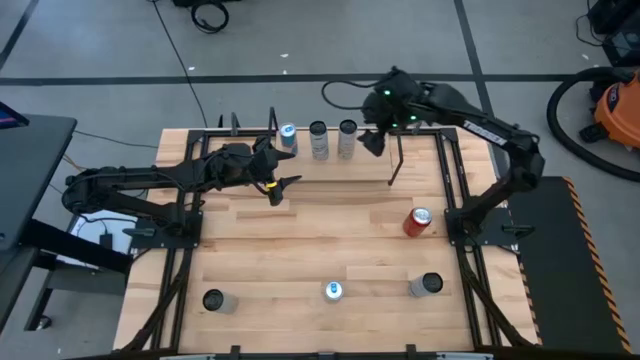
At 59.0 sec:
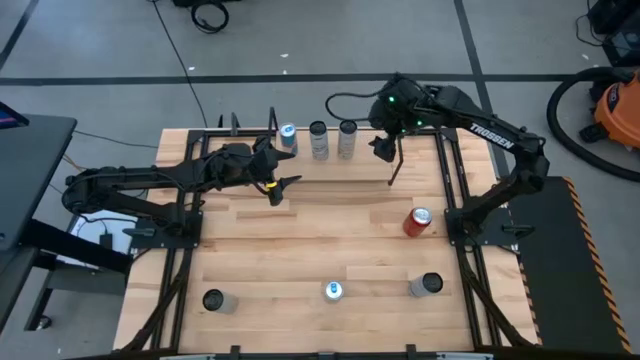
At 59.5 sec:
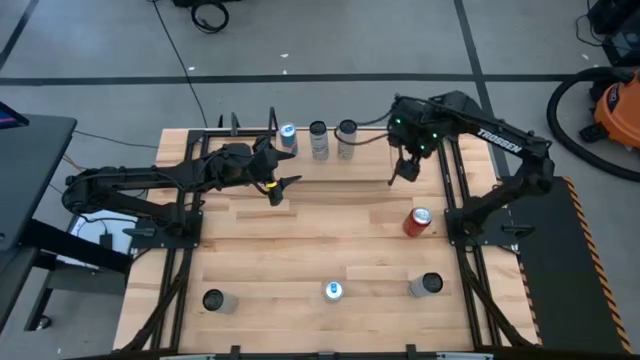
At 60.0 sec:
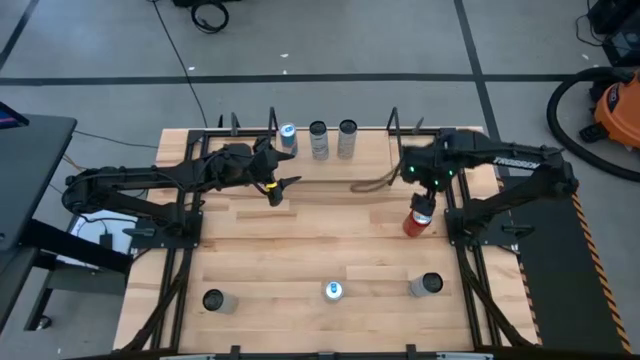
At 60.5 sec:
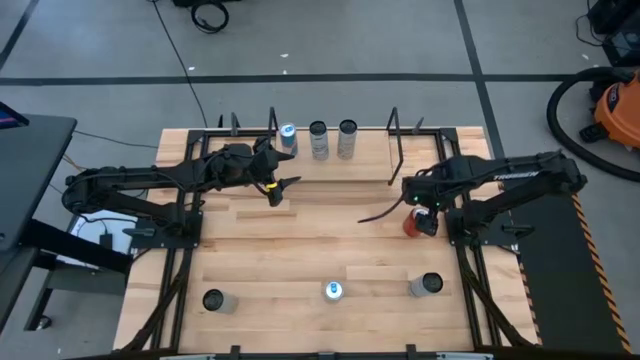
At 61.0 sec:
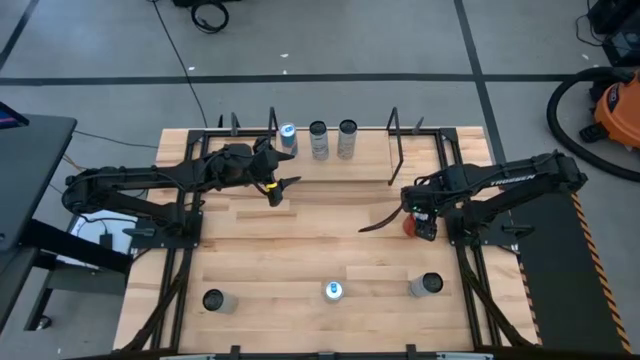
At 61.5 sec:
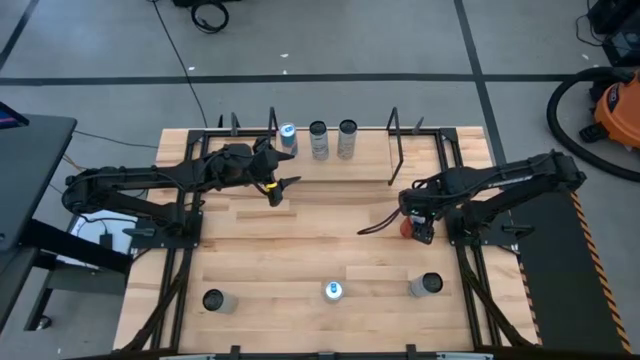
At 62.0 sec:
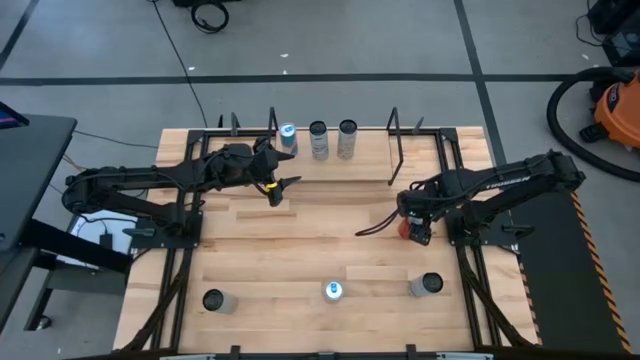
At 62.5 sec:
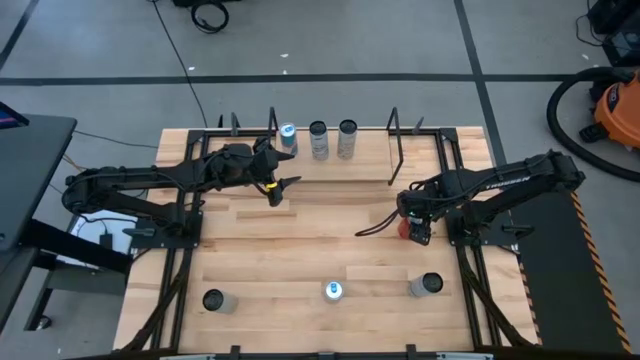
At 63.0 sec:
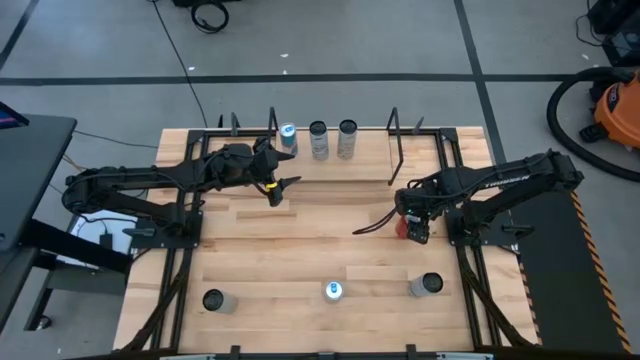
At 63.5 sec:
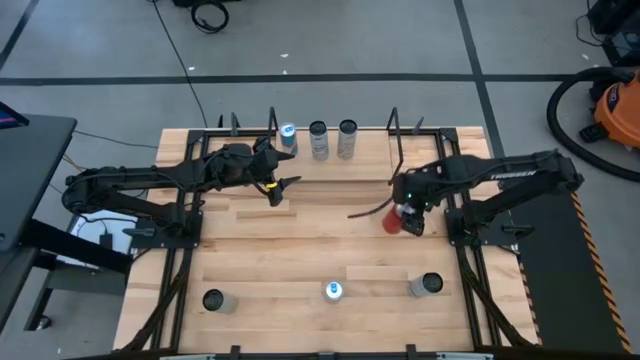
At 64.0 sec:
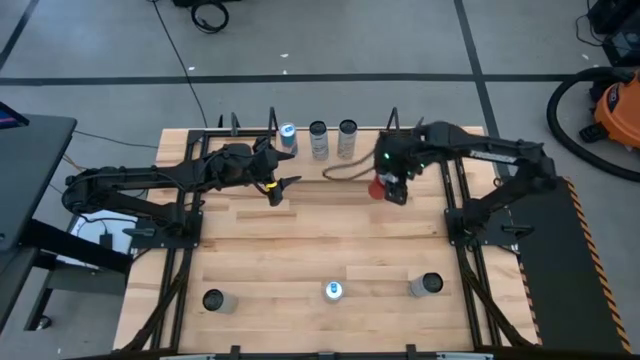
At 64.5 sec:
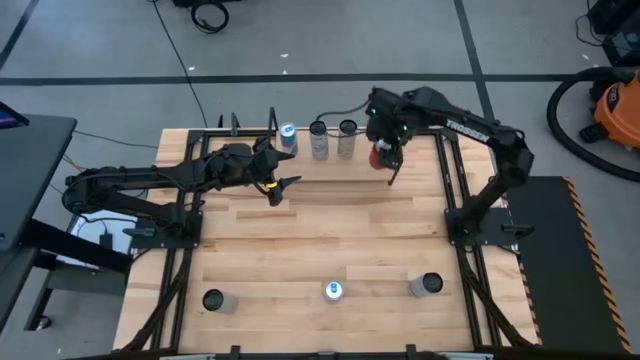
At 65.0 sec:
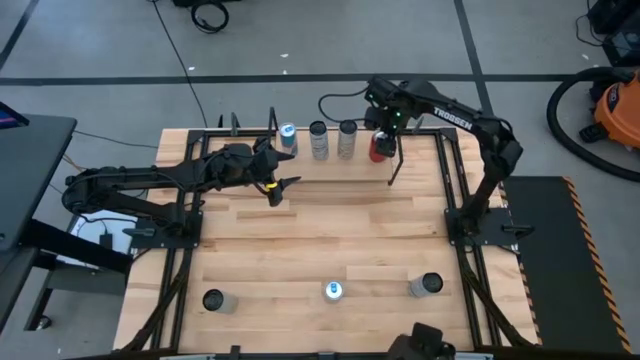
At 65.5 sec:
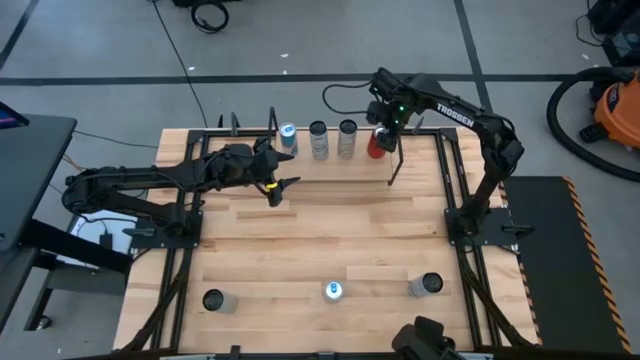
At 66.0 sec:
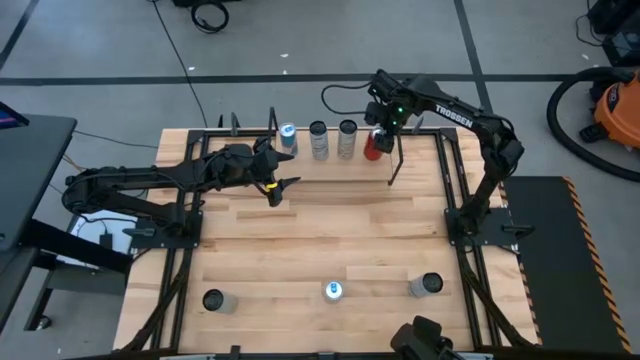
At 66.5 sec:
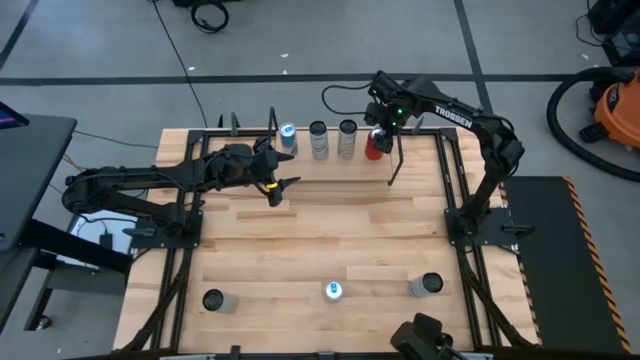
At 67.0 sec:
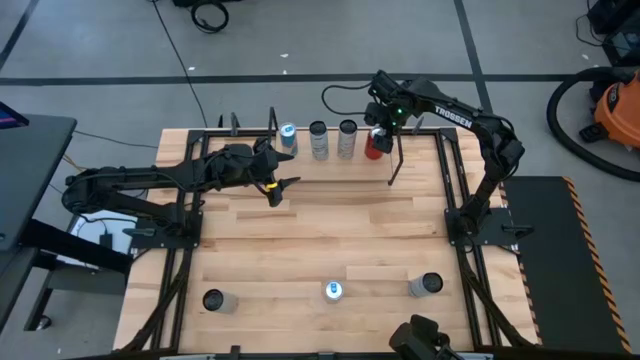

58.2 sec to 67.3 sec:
Task: Place canned beverage on shelf
Put the bottom red-black soda can on the shelf

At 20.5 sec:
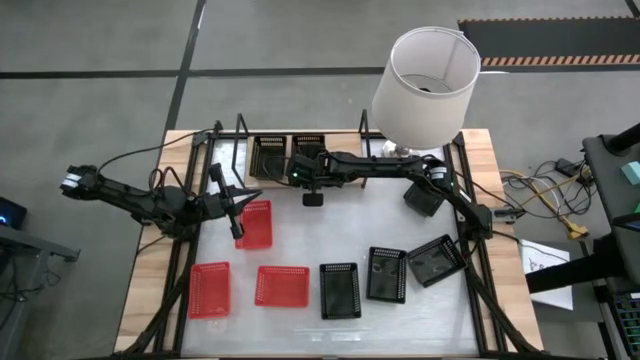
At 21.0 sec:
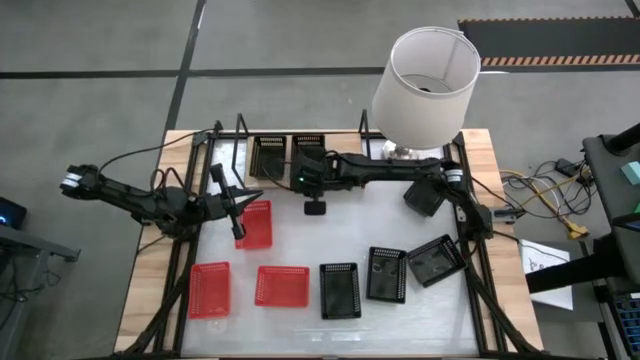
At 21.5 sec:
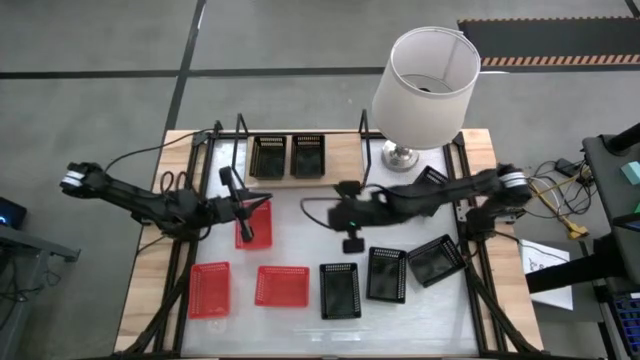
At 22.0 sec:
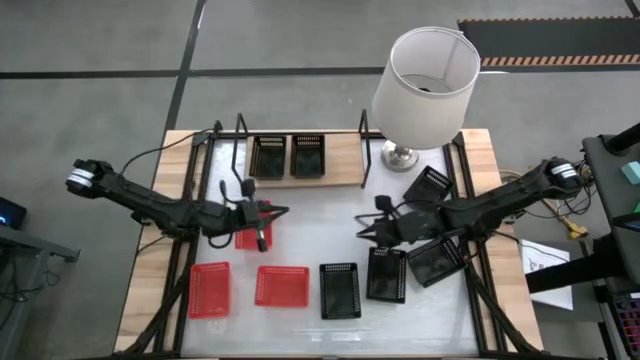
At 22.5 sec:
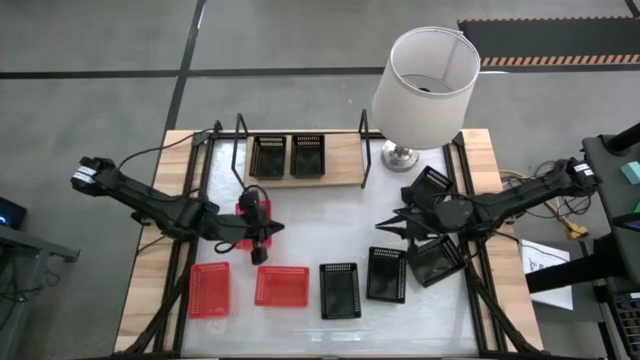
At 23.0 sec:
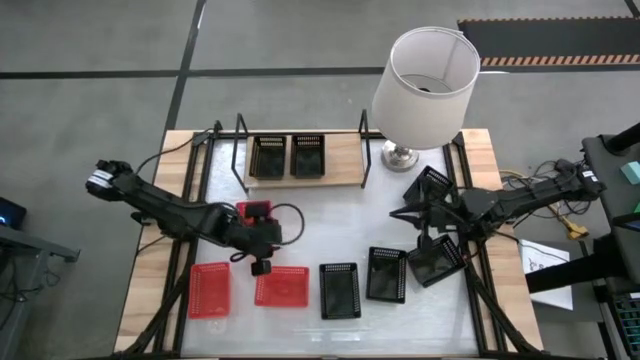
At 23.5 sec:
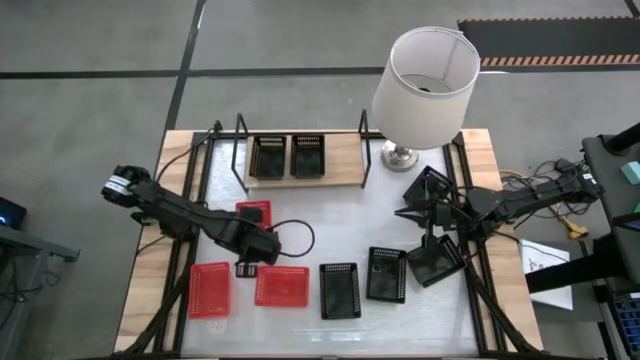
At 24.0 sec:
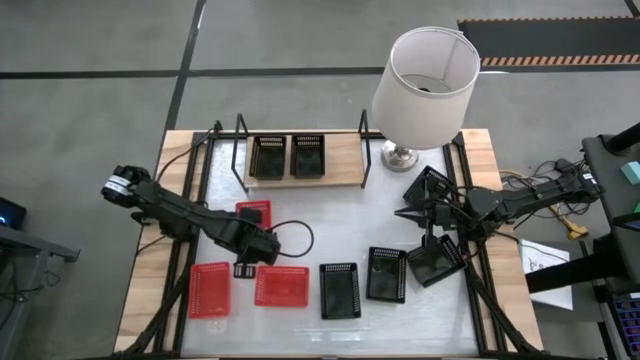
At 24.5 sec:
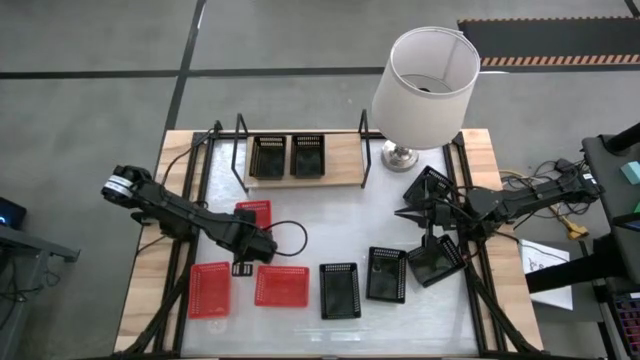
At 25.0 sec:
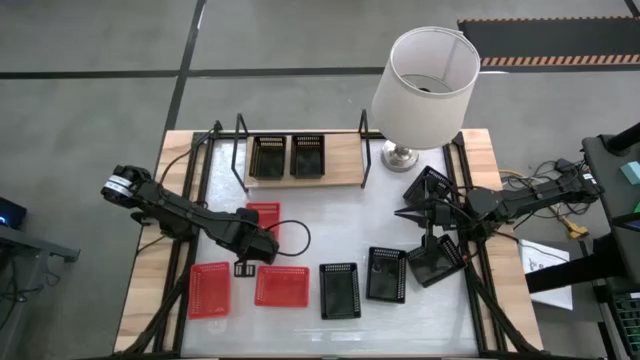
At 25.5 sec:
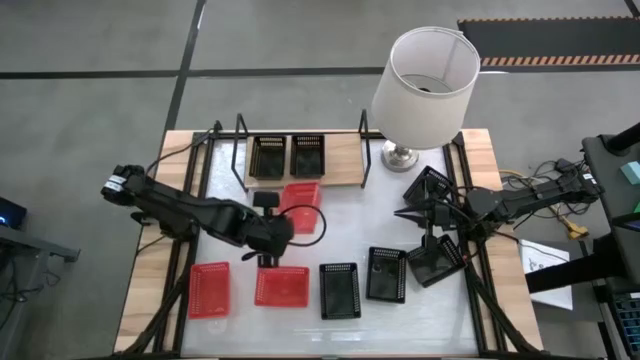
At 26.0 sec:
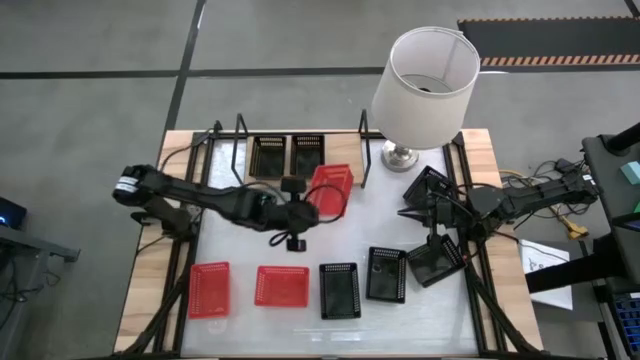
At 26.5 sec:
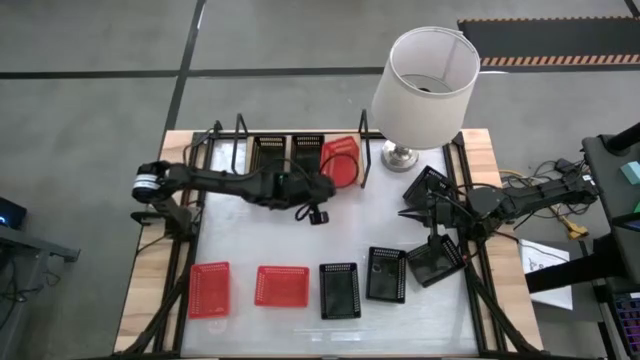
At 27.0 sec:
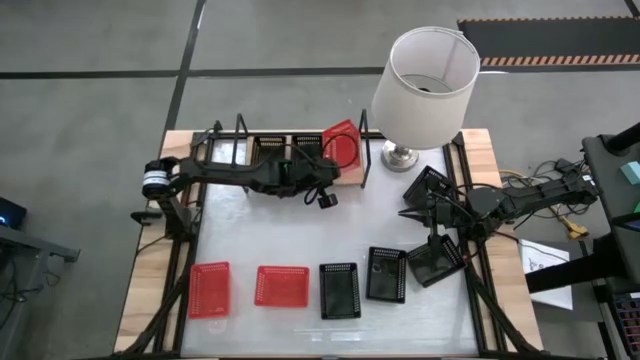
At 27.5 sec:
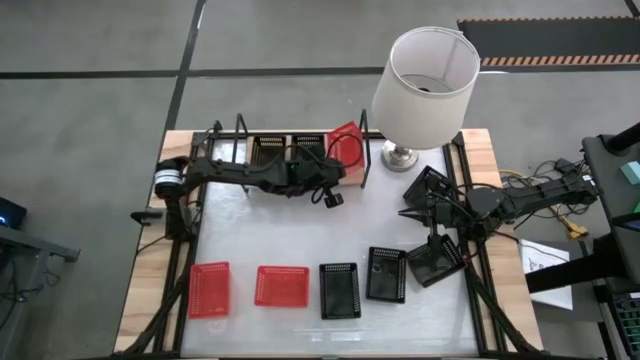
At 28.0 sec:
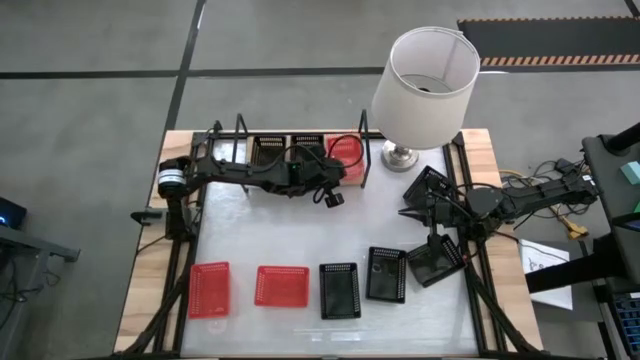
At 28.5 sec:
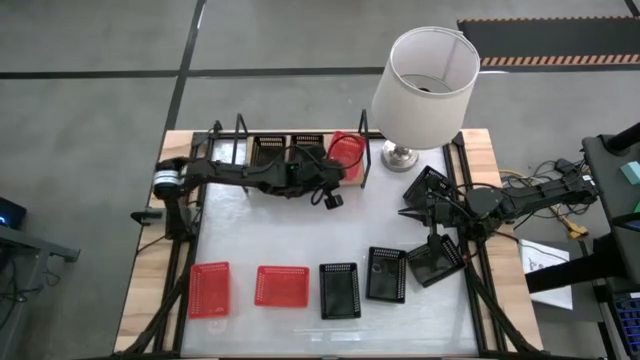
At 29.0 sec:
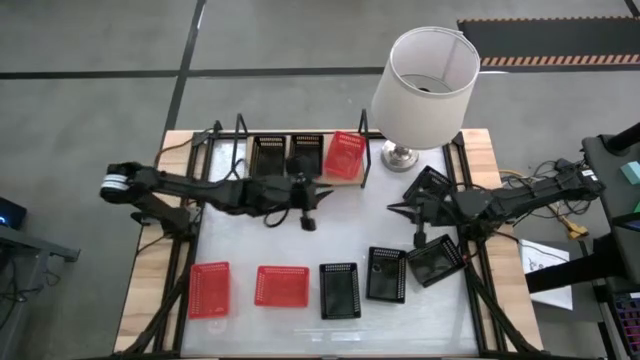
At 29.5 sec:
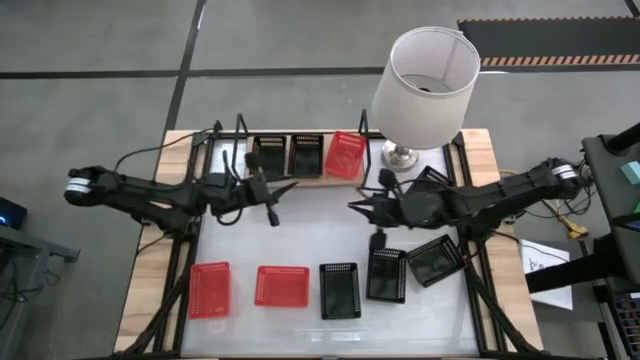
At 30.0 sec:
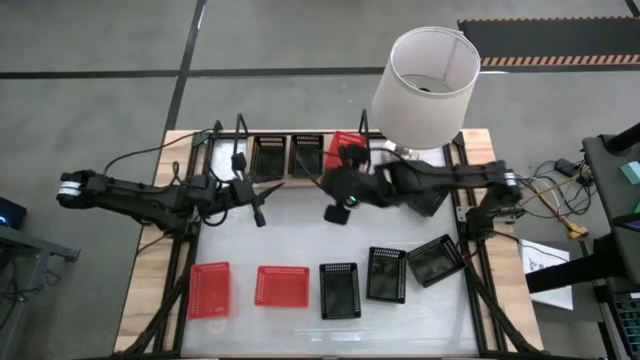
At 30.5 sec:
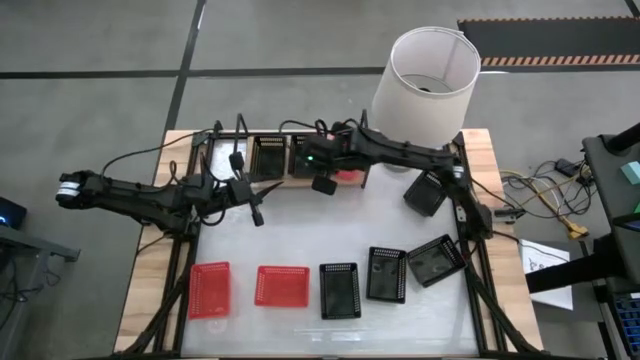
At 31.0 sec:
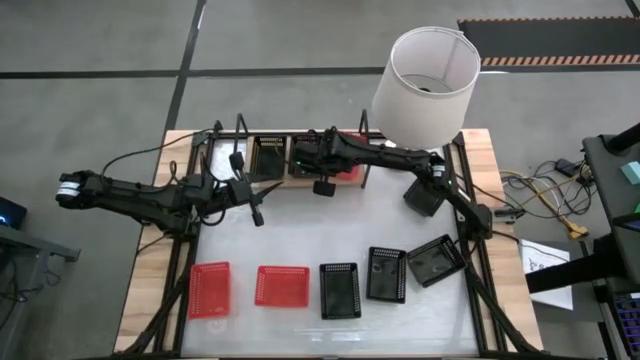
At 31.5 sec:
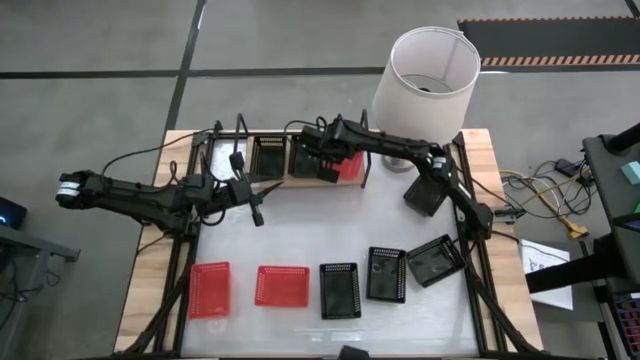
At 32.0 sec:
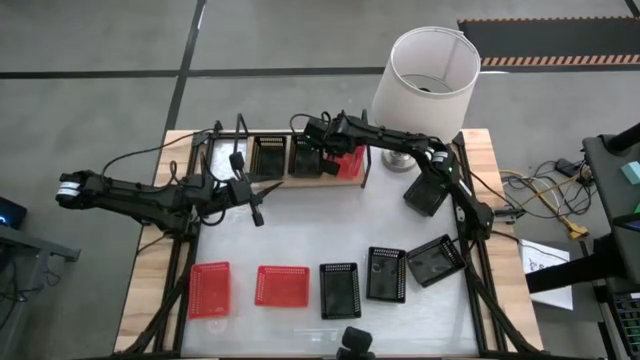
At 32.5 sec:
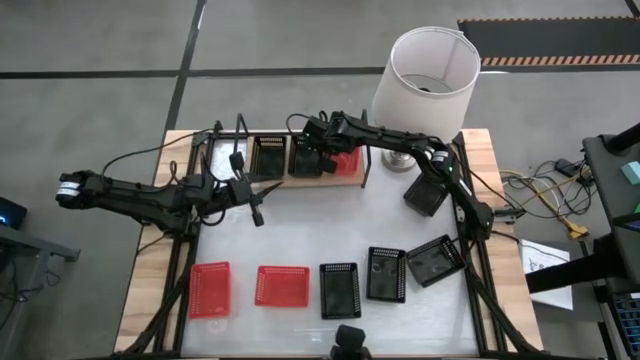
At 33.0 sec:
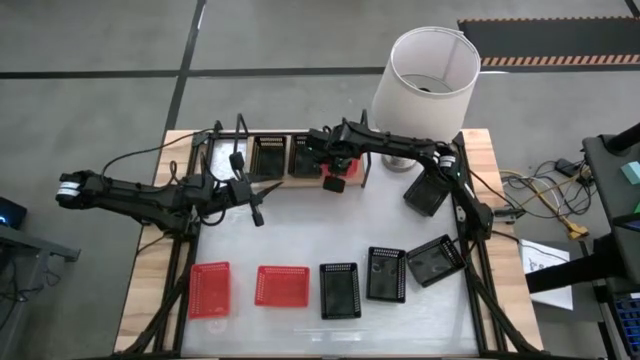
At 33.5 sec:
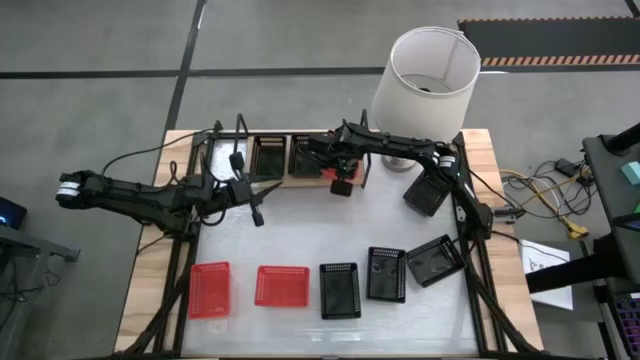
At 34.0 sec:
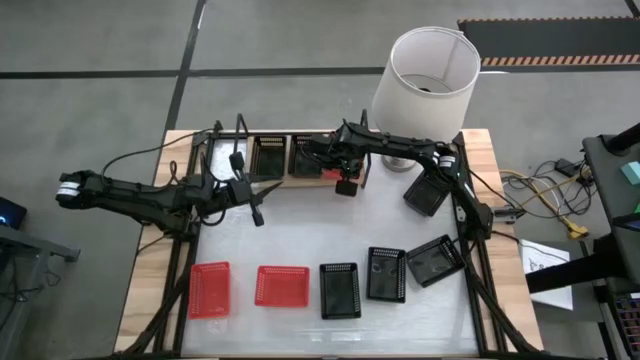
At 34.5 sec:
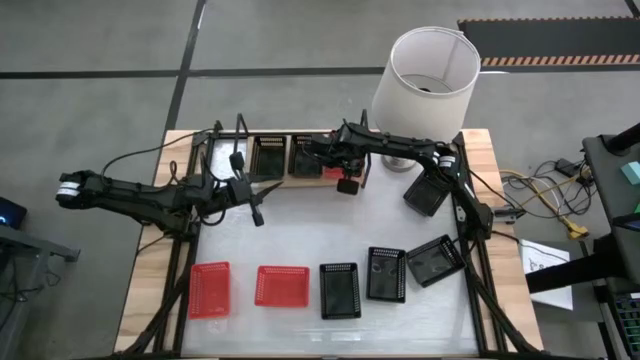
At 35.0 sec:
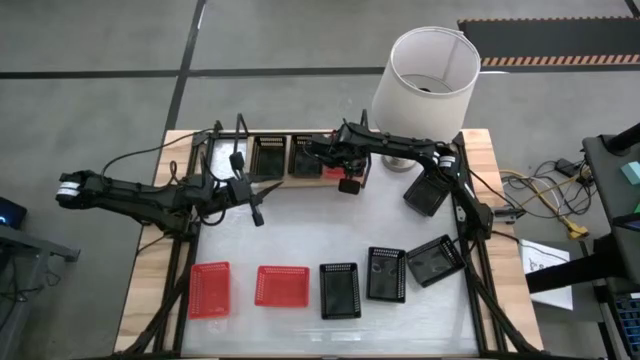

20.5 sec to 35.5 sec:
Task: Stack baskets on shelf by color
Put the top red bin on the shelf
